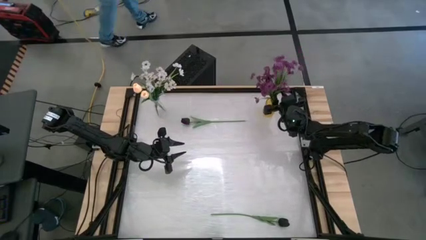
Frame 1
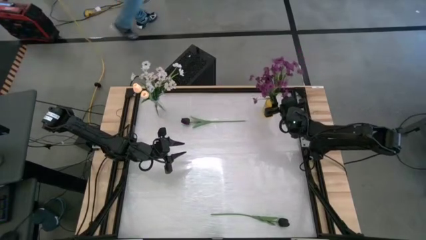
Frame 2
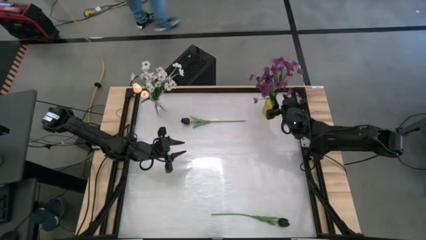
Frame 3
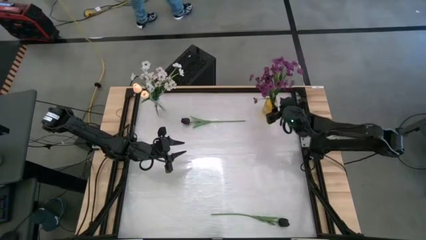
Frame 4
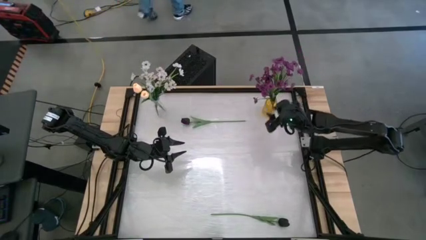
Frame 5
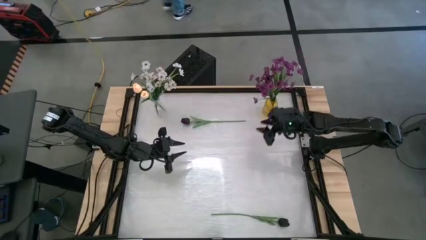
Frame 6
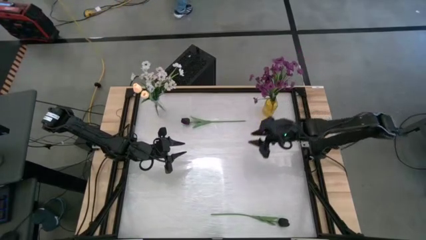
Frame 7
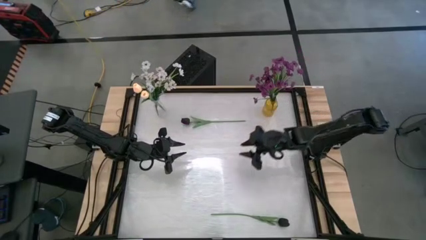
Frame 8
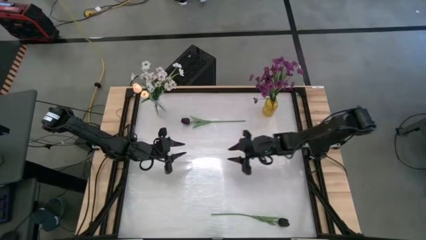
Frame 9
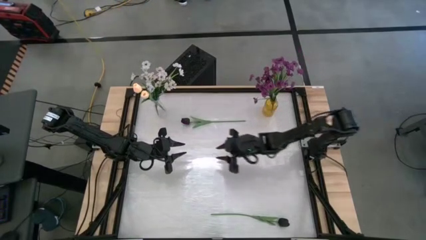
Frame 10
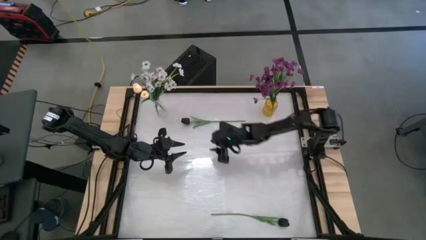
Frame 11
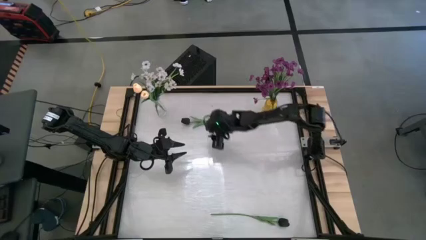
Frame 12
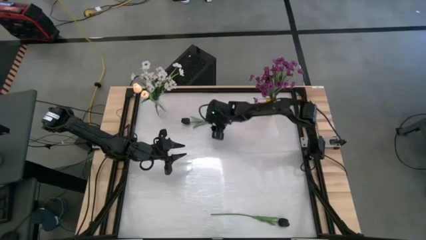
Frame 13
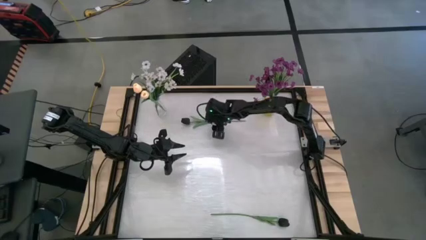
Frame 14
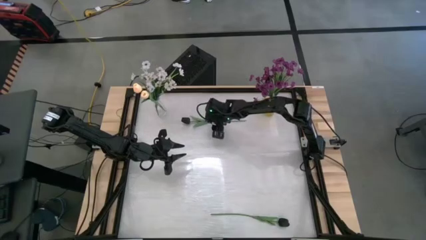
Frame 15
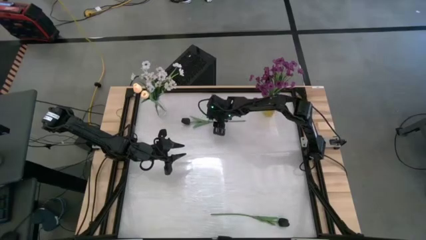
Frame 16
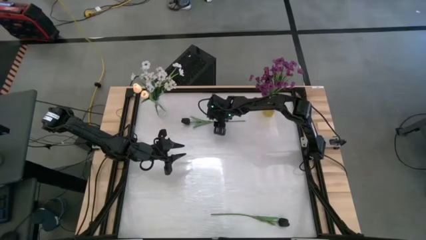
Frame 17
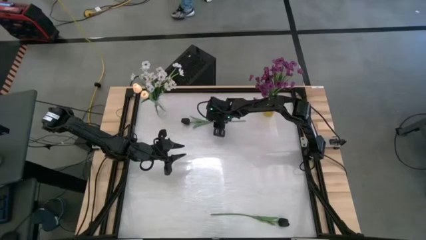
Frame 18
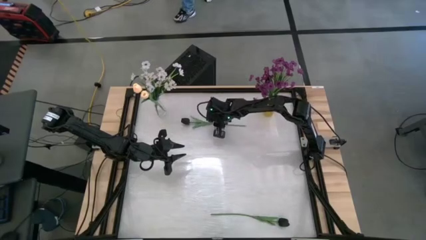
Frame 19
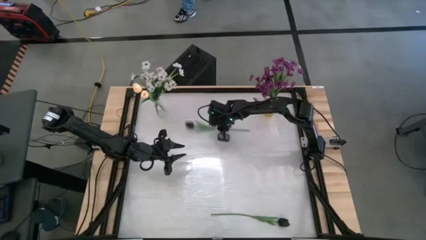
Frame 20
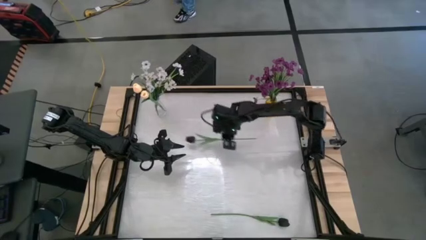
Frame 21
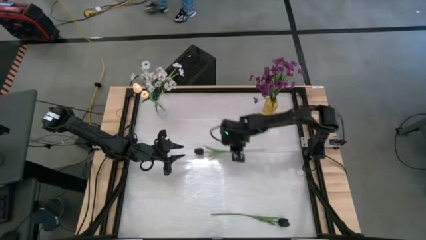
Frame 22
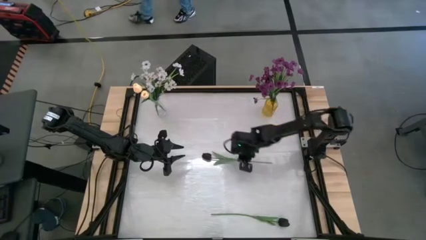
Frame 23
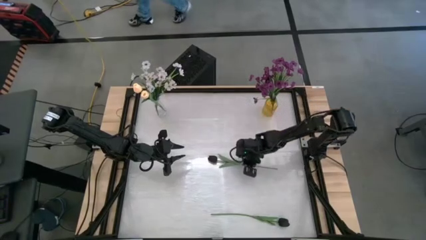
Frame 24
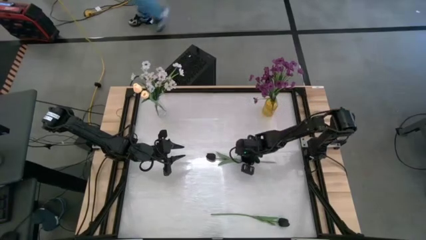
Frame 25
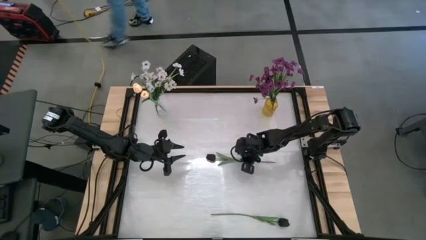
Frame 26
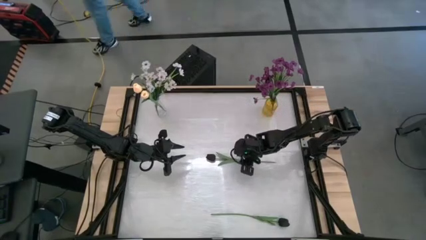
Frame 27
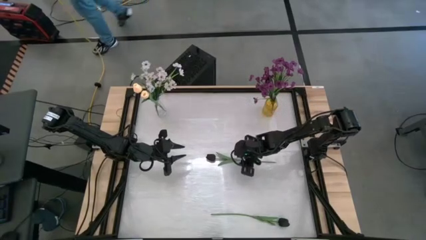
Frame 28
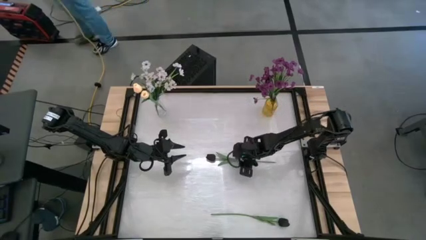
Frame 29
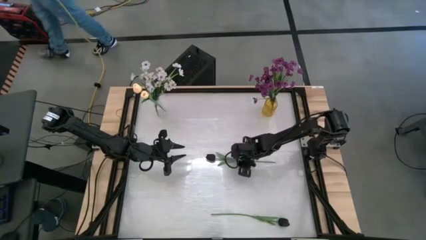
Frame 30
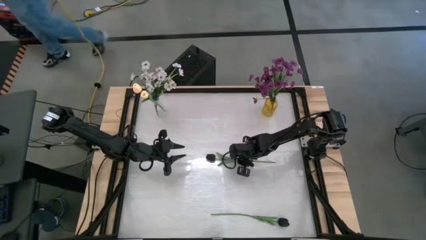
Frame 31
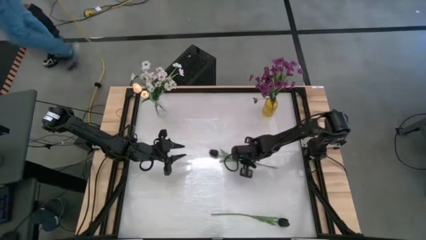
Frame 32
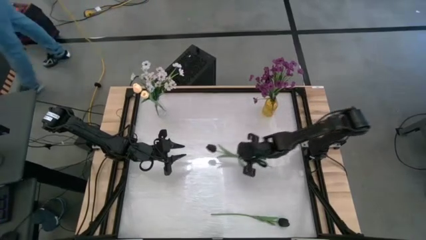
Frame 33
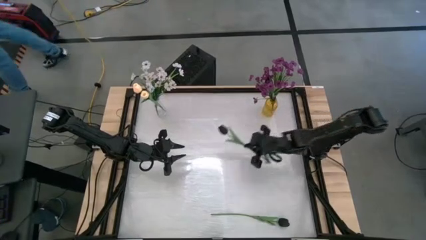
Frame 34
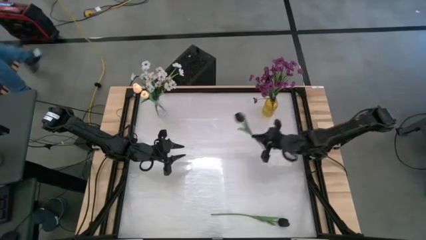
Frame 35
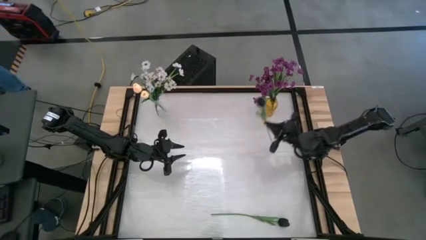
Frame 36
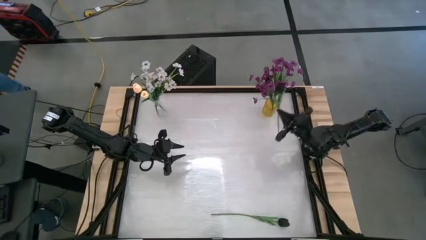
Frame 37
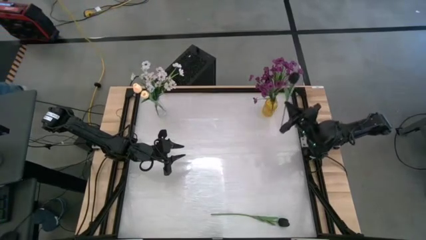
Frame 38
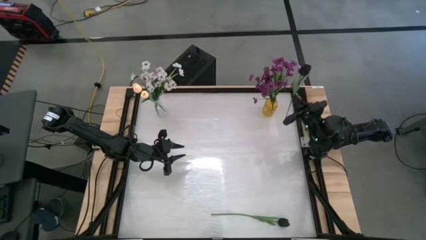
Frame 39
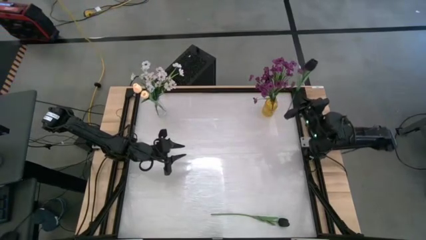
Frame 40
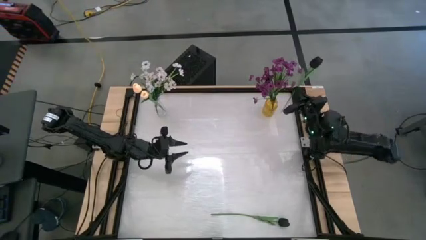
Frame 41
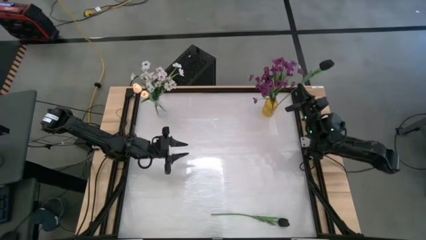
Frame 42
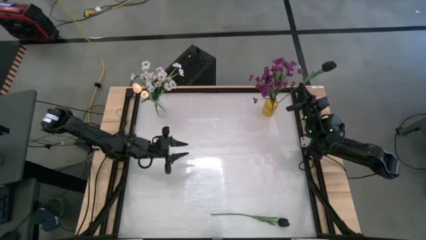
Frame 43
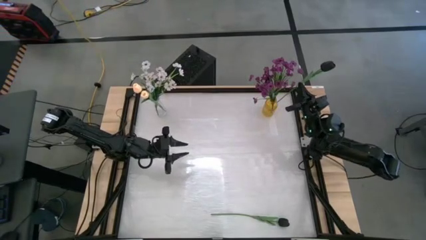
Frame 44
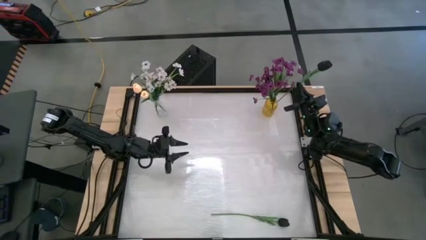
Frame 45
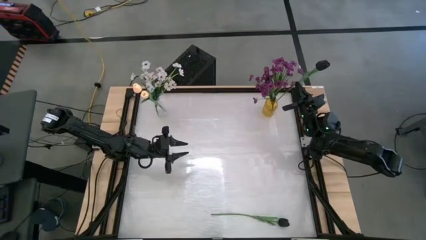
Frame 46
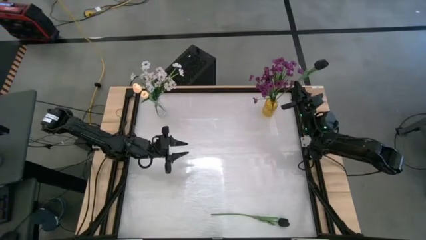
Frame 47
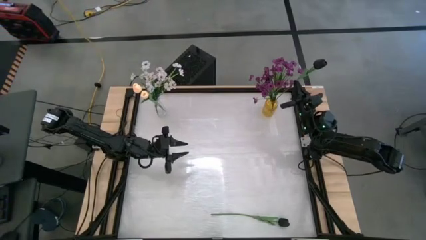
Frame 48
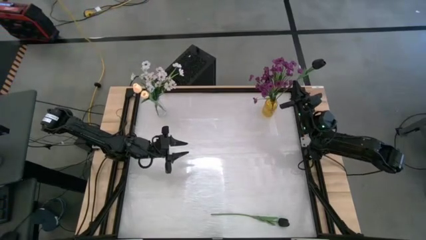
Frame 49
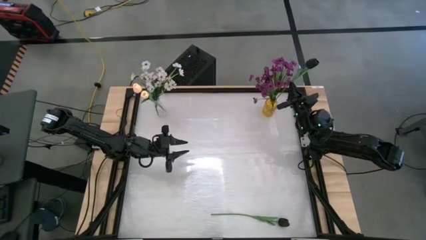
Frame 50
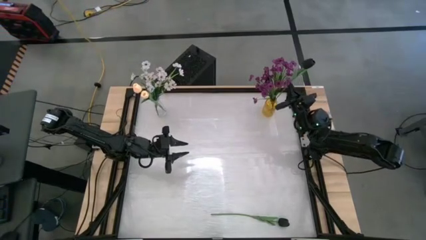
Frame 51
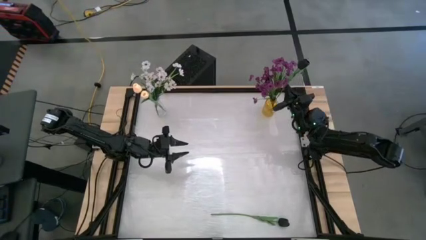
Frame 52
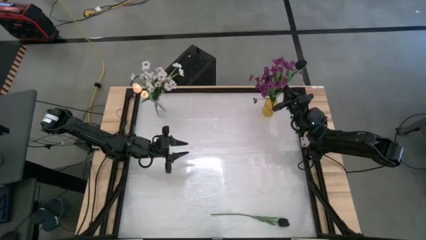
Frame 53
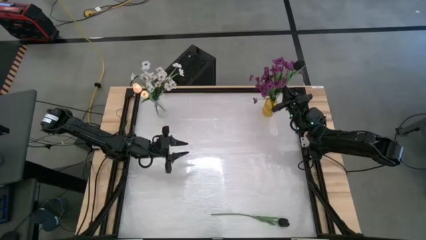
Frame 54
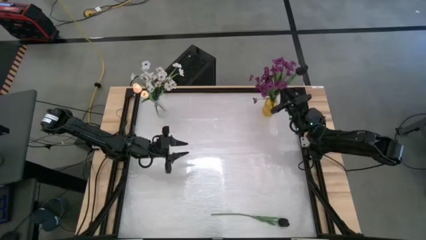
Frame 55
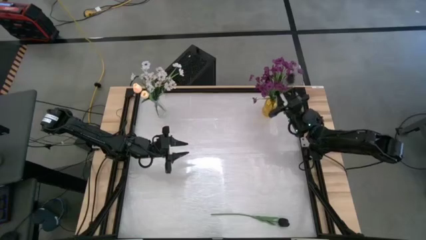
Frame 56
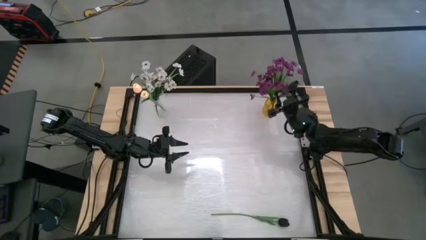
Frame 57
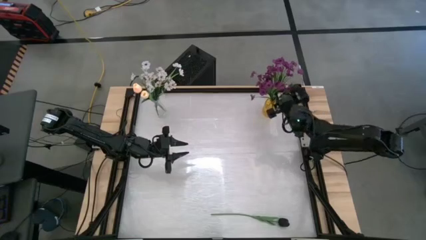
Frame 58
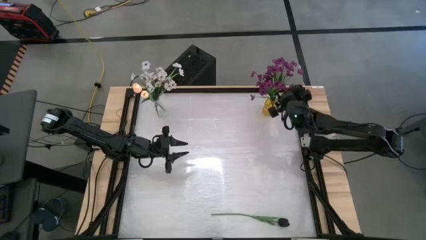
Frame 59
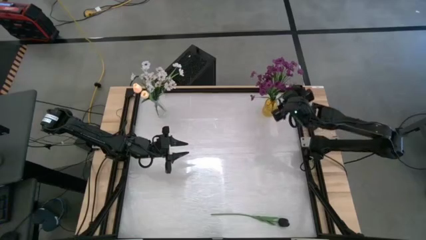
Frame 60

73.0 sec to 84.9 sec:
Task: Sort flowers into vase by color
Put the top black tulip into the yellow vase
